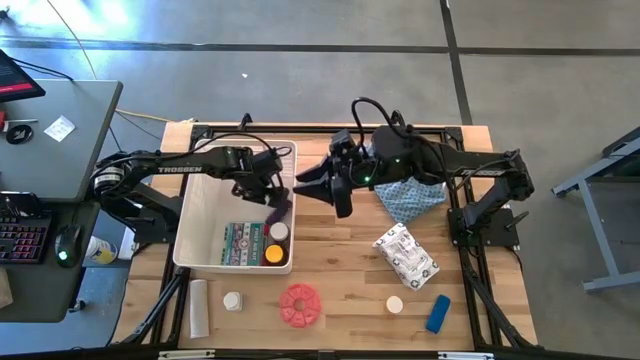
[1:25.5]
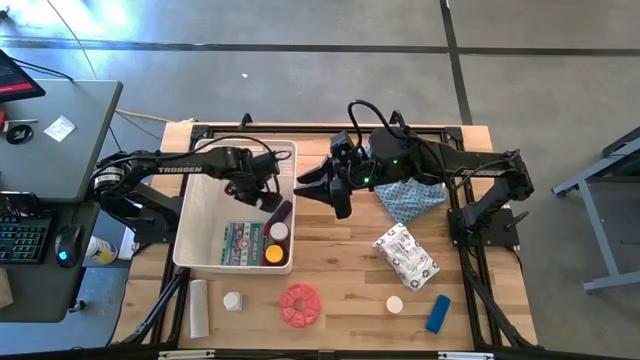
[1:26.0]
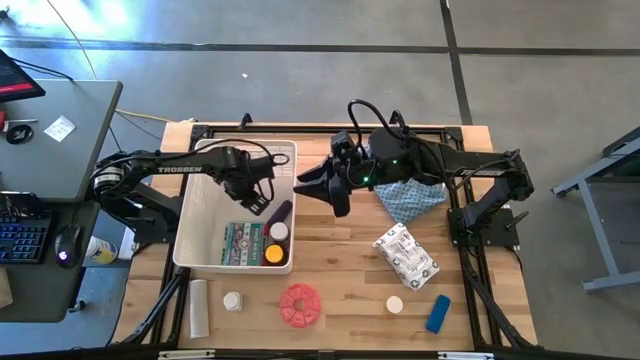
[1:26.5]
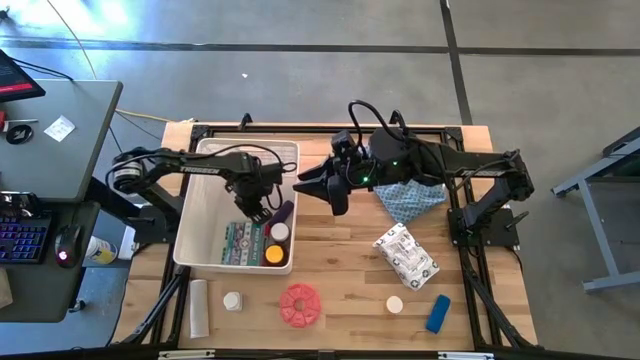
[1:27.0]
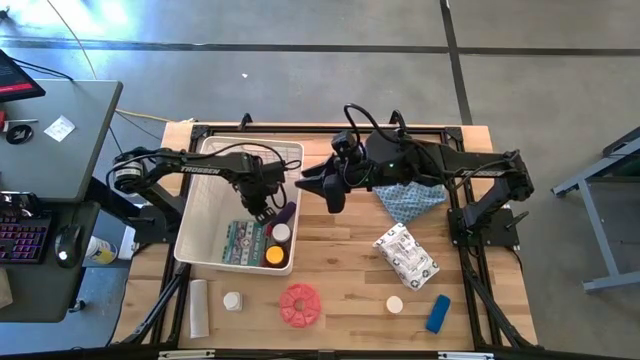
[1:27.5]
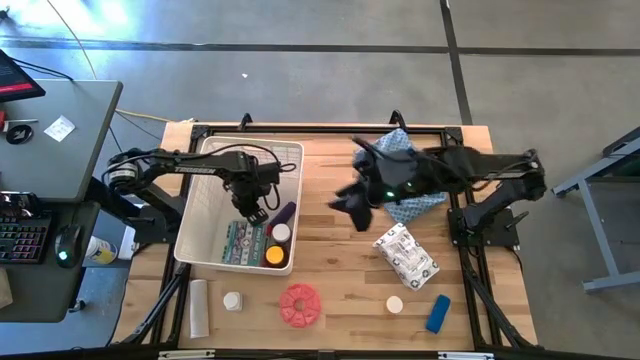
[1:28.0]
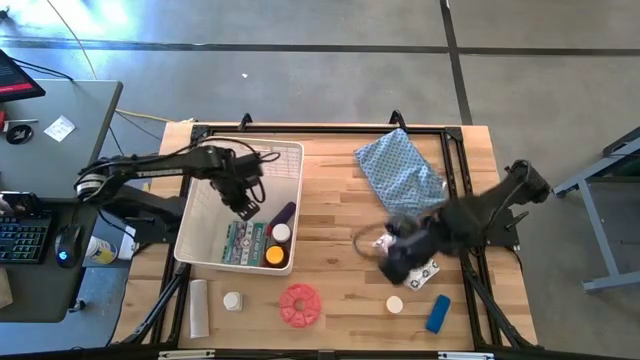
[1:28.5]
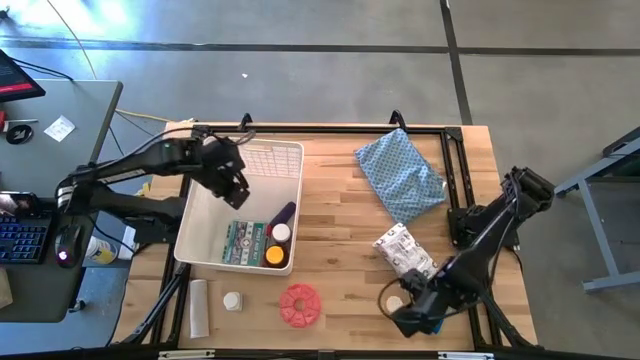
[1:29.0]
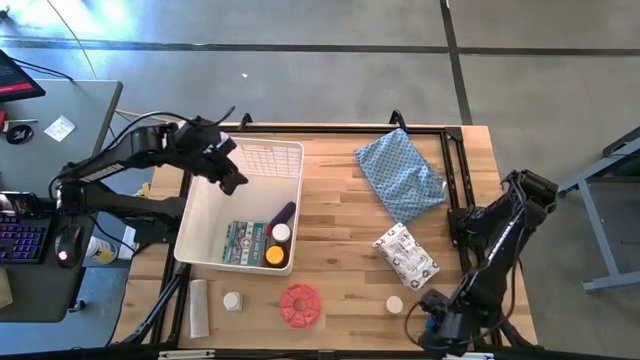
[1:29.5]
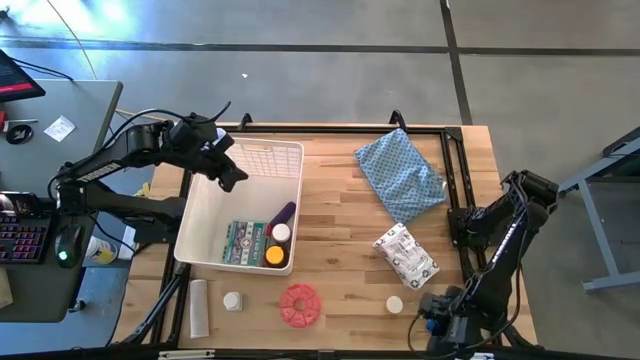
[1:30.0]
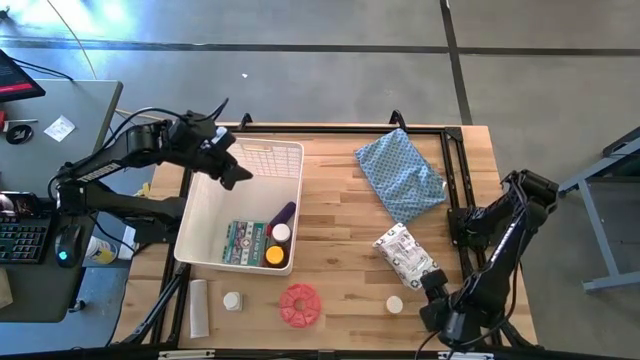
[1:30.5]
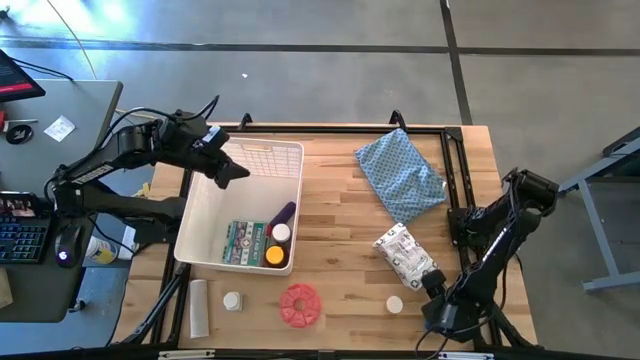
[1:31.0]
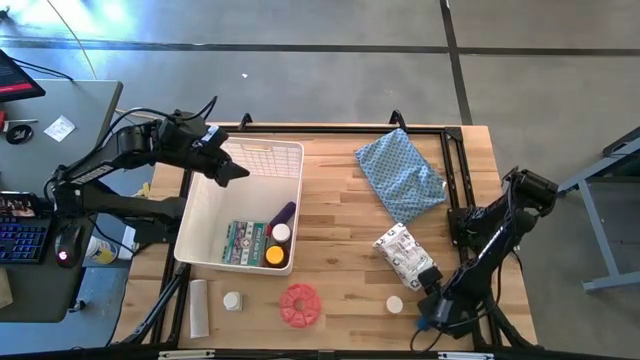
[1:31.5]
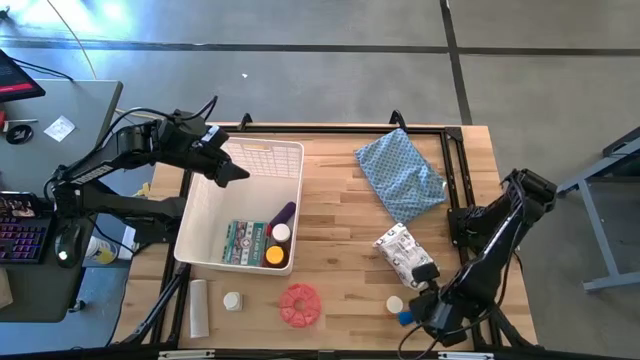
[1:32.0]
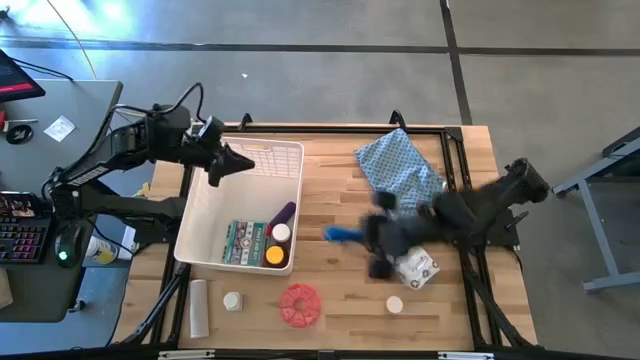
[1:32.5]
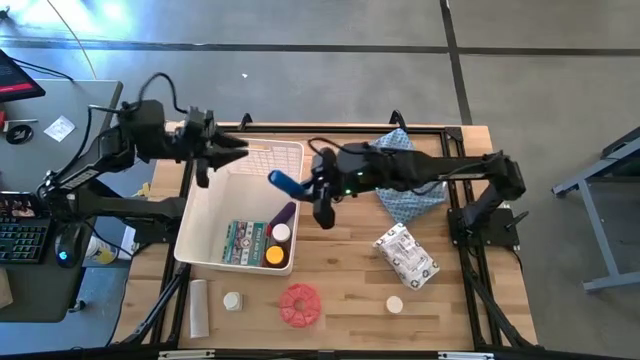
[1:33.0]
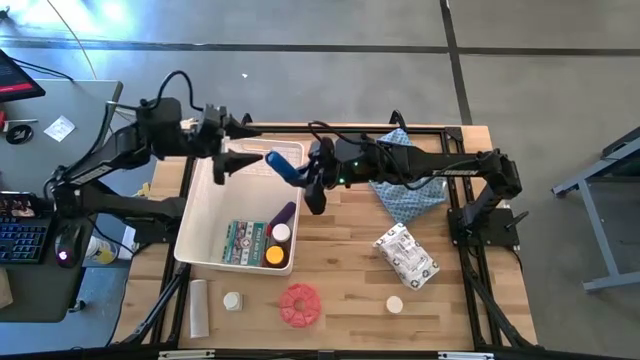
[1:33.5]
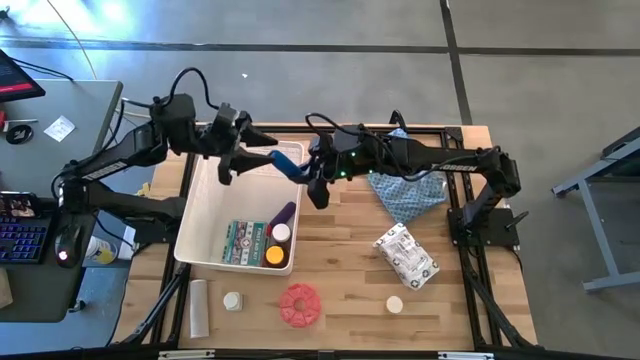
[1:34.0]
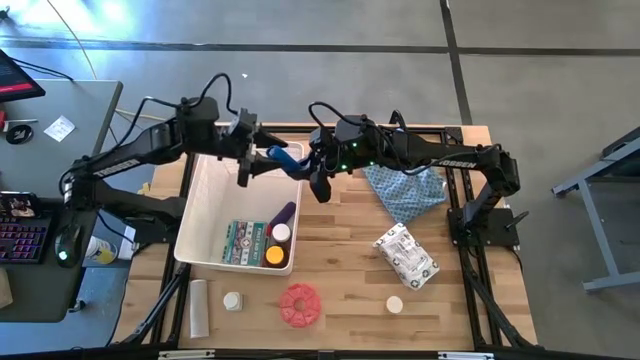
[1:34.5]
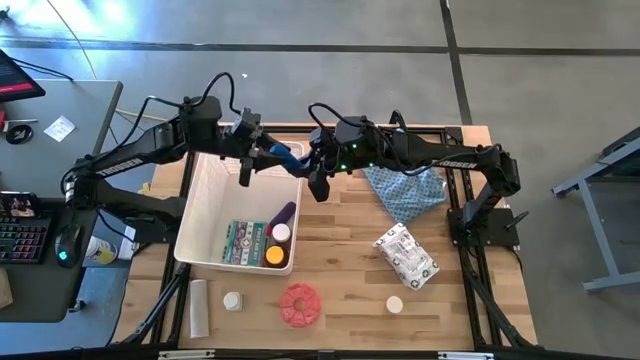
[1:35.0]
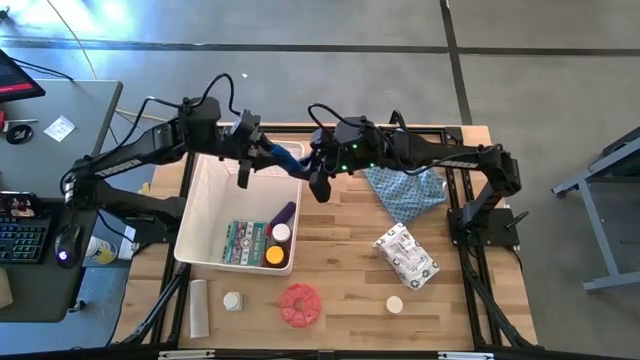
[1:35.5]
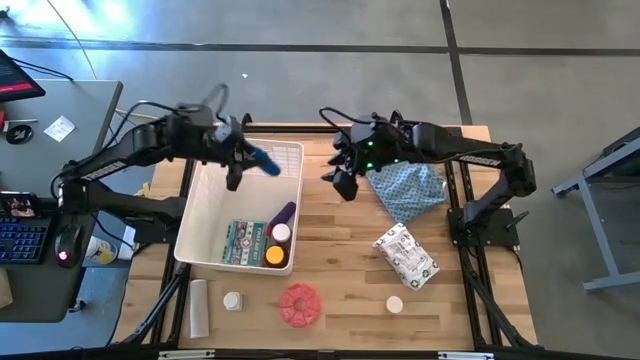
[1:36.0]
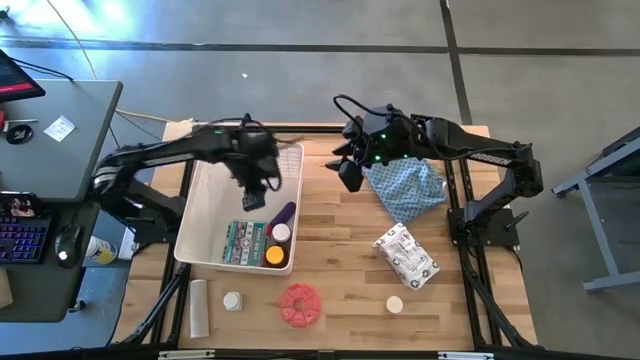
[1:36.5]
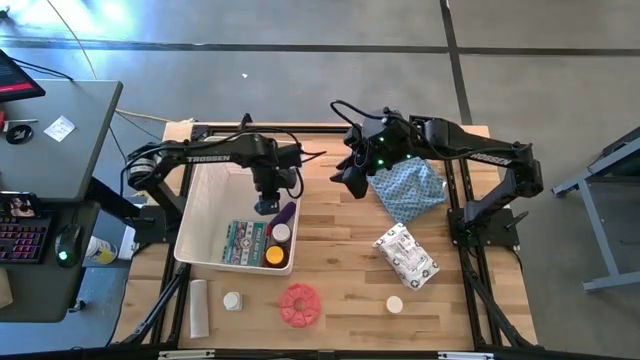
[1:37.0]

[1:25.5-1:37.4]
Task: Pick & place medical supplies in basket/bin
Put the blue rolled gauze into the white bin

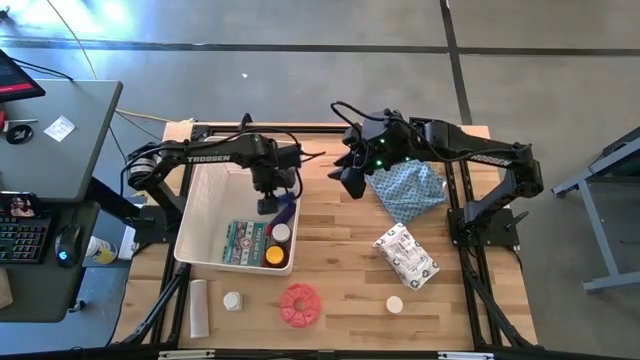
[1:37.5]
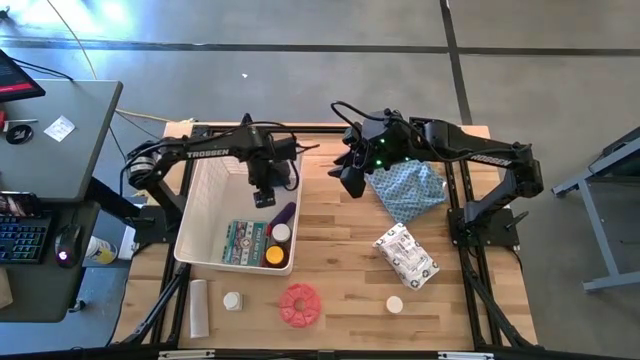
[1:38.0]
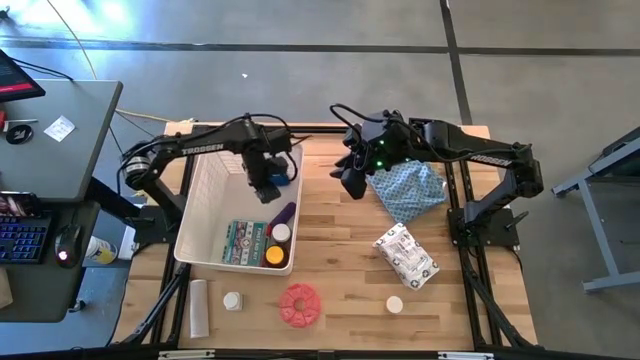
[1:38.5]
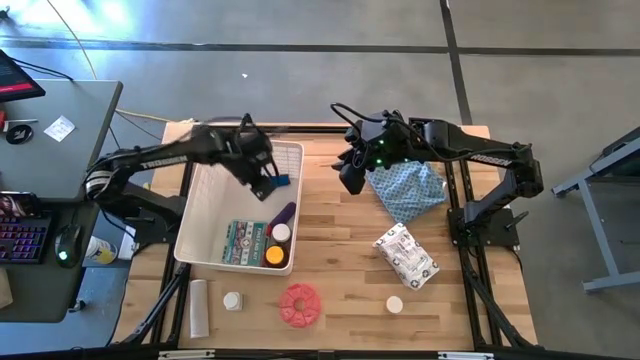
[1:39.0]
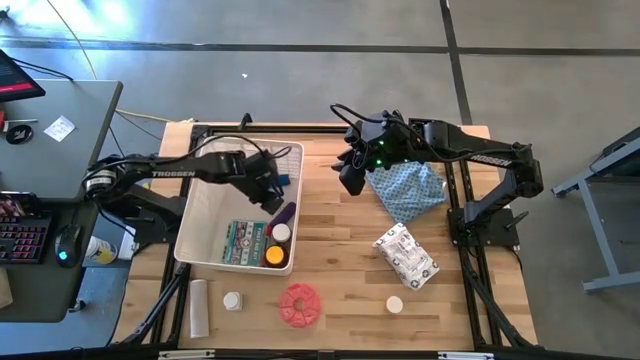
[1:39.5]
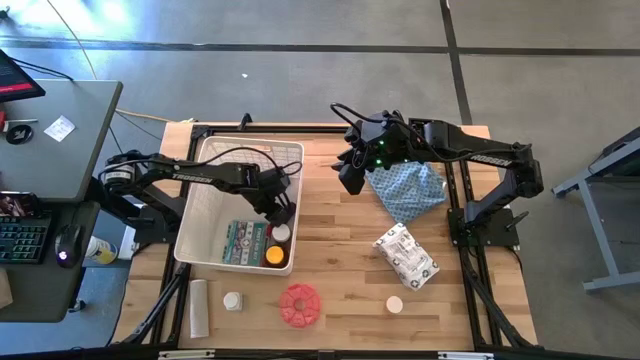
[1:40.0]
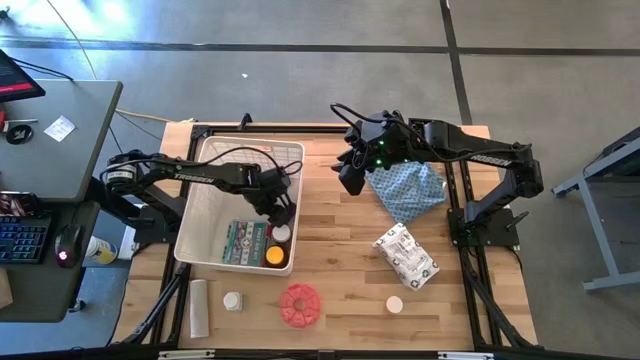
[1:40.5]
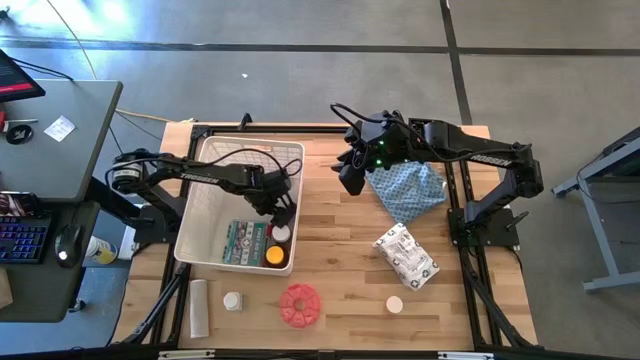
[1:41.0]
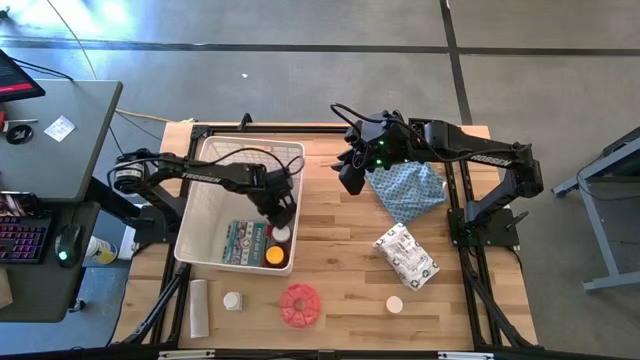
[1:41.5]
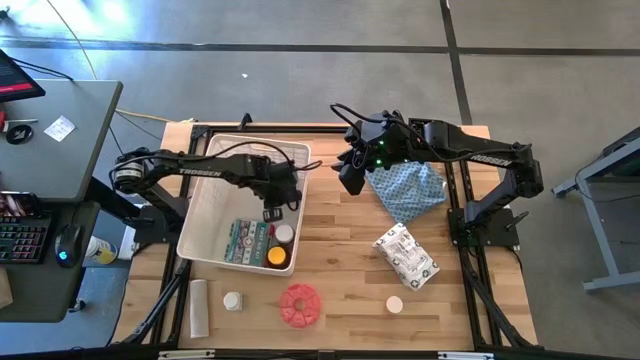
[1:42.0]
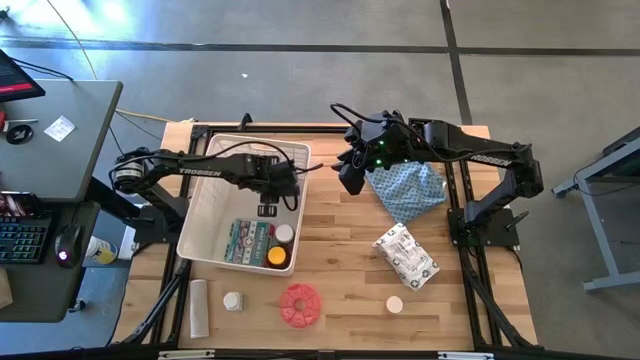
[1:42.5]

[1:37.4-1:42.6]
Adjust the violet rolled gauze in the white bin

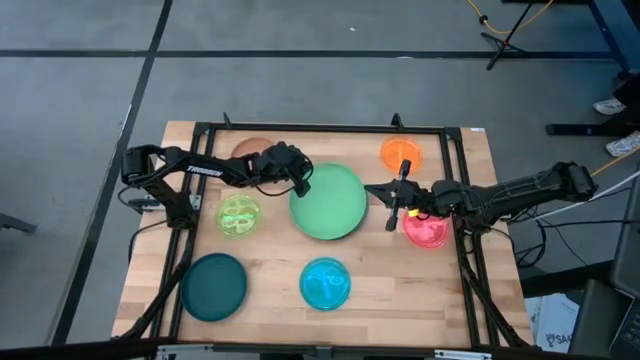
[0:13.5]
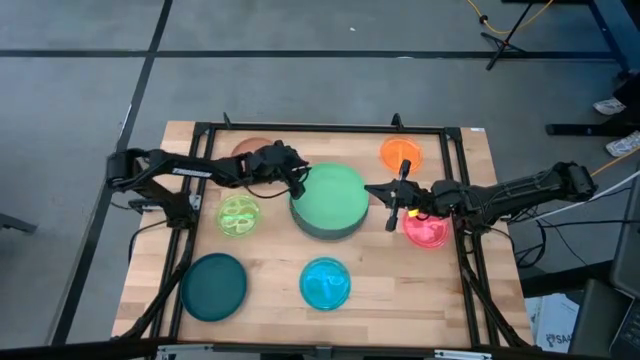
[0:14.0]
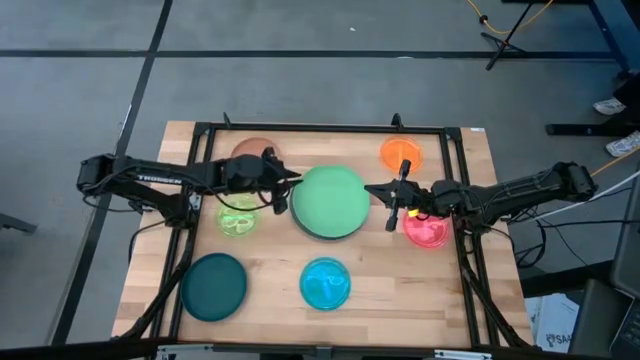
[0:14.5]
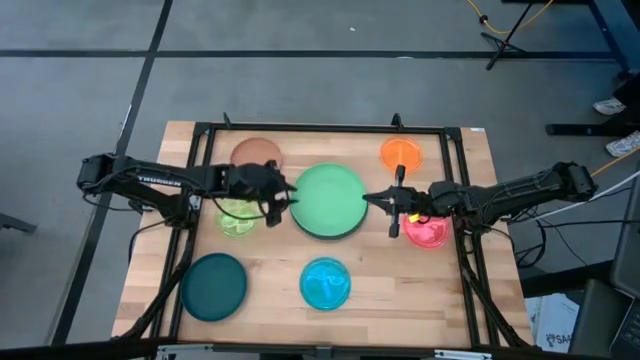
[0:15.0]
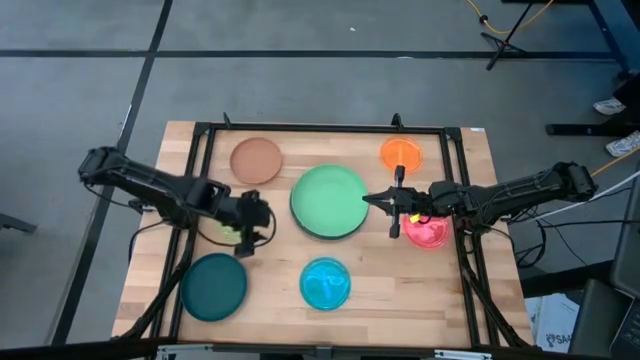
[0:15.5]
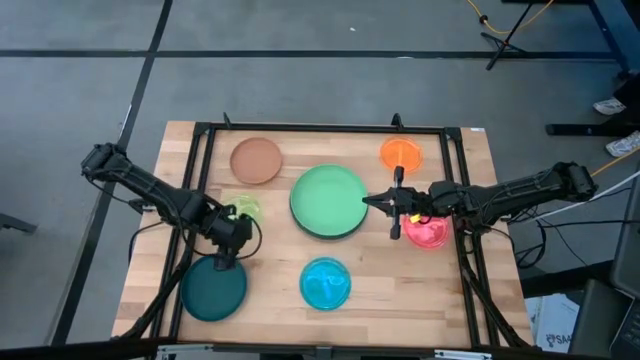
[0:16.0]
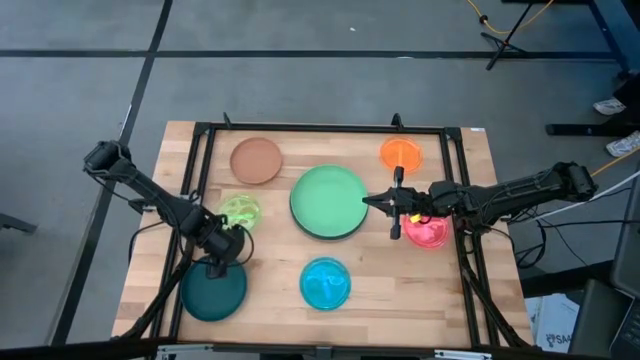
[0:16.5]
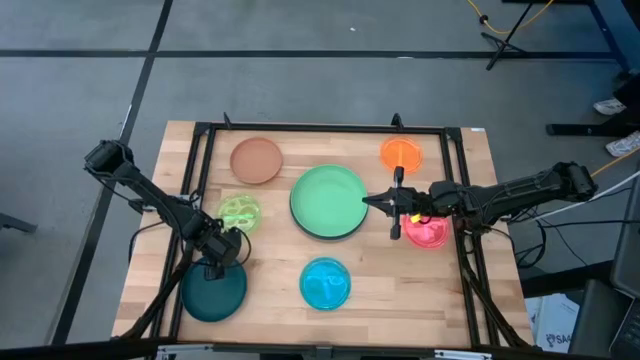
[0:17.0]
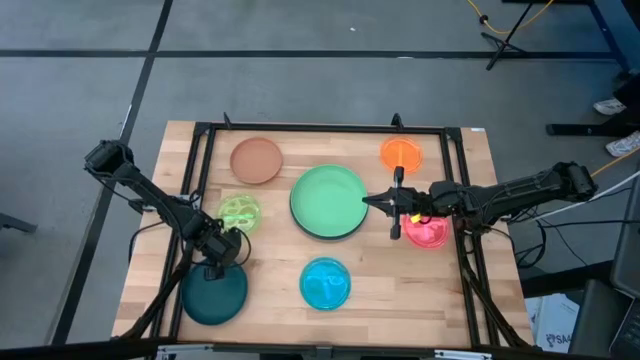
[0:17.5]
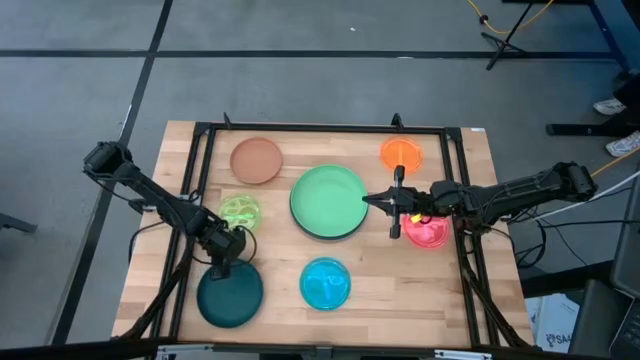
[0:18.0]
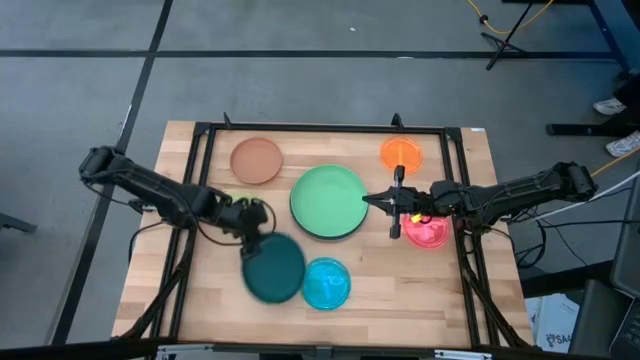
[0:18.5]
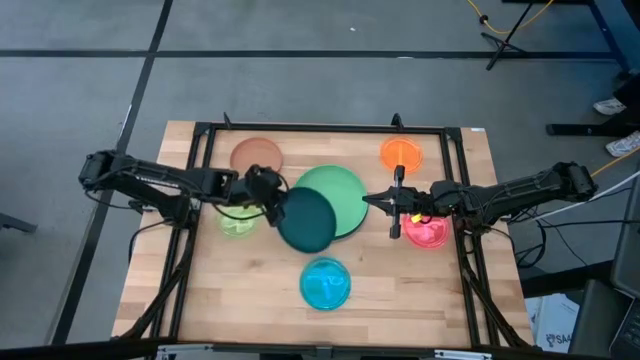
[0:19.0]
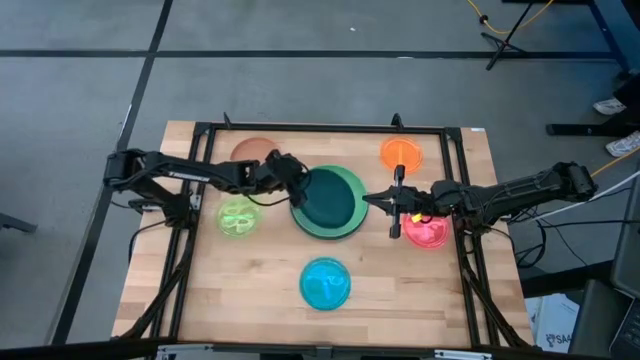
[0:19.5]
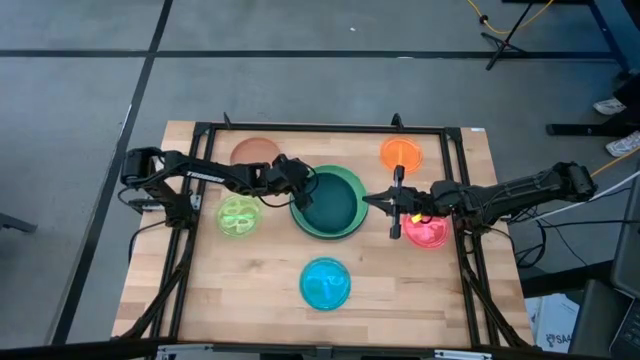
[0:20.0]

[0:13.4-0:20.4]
Task: Stack plastic plates
Stack the dark blue plate on top of the green plate
